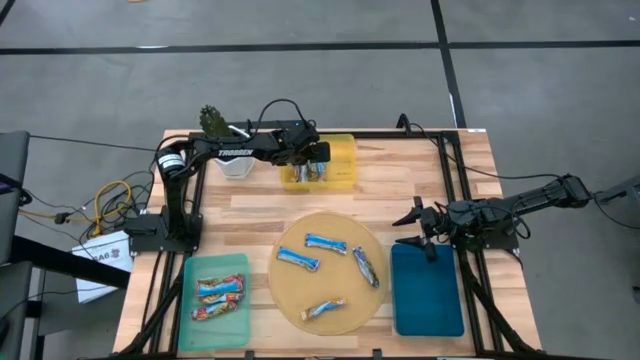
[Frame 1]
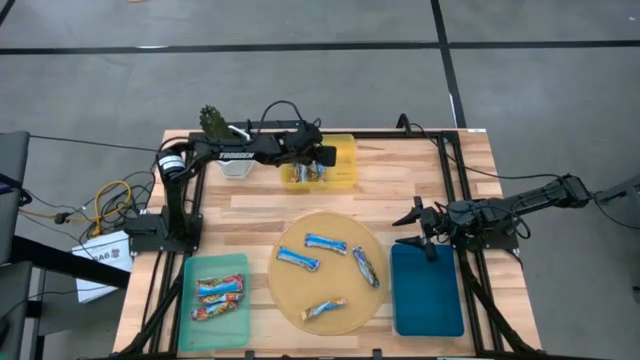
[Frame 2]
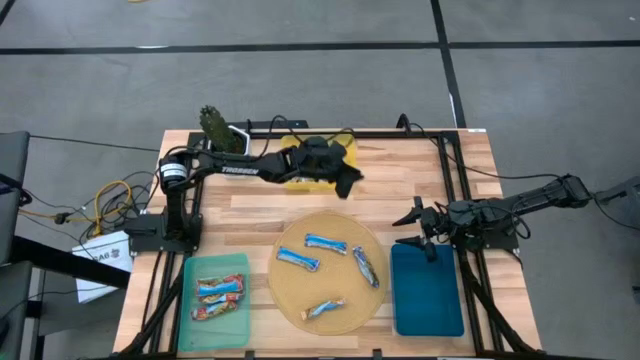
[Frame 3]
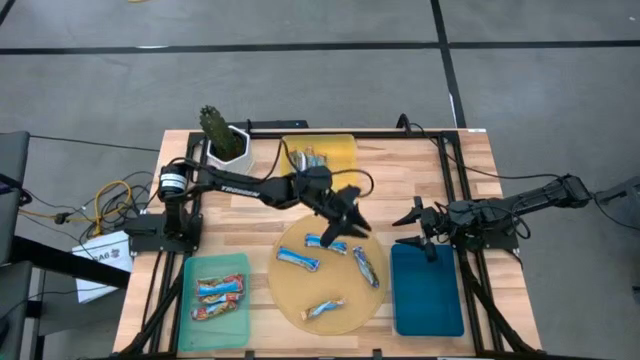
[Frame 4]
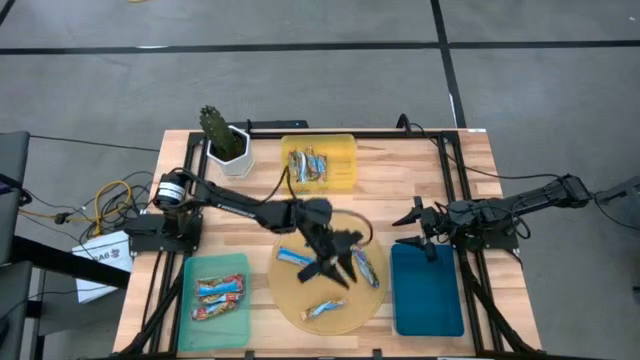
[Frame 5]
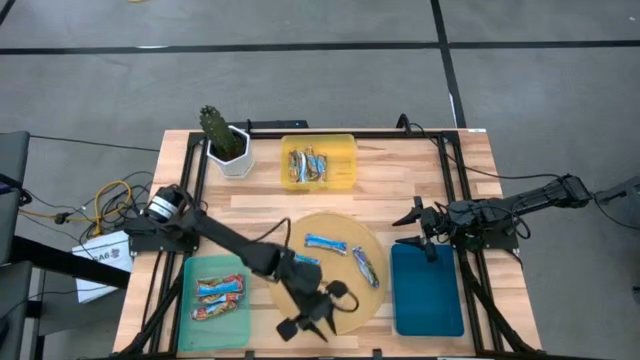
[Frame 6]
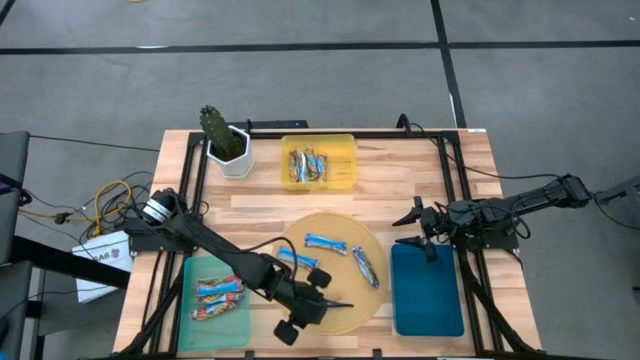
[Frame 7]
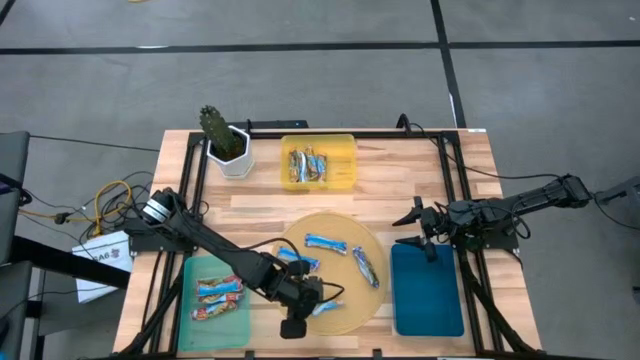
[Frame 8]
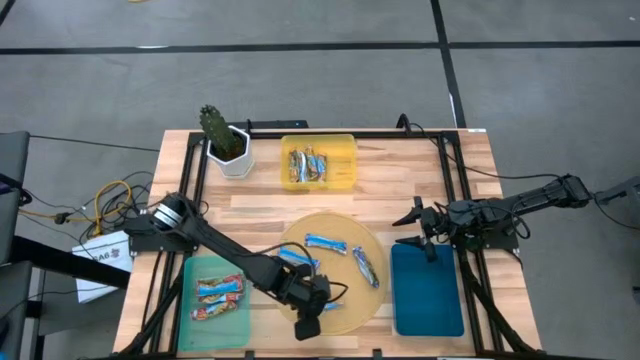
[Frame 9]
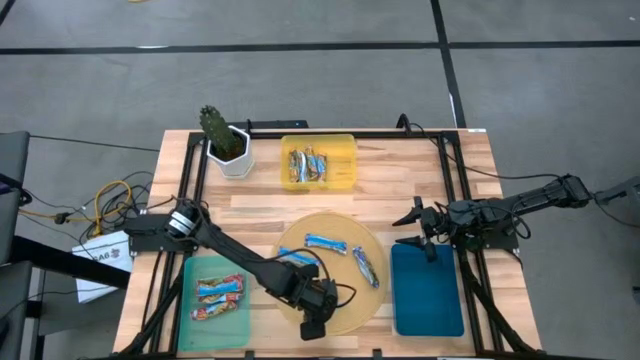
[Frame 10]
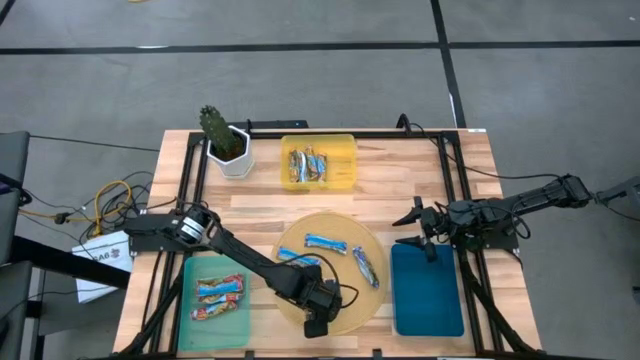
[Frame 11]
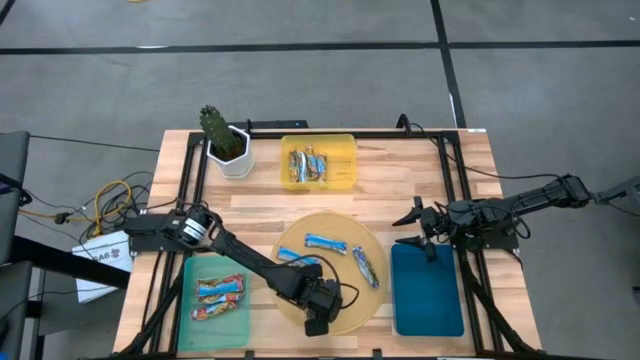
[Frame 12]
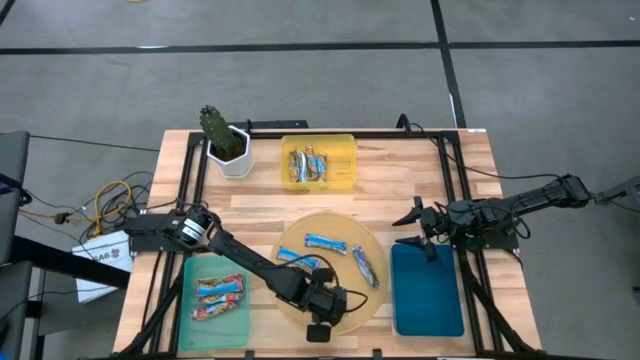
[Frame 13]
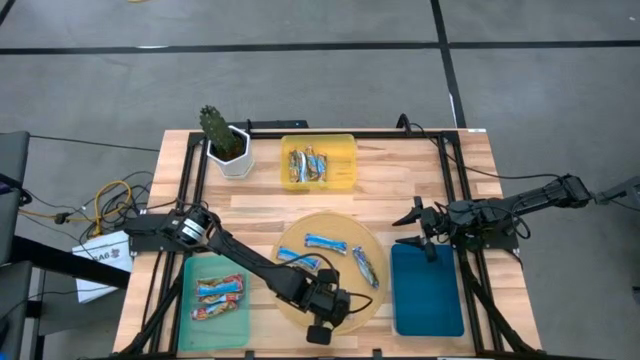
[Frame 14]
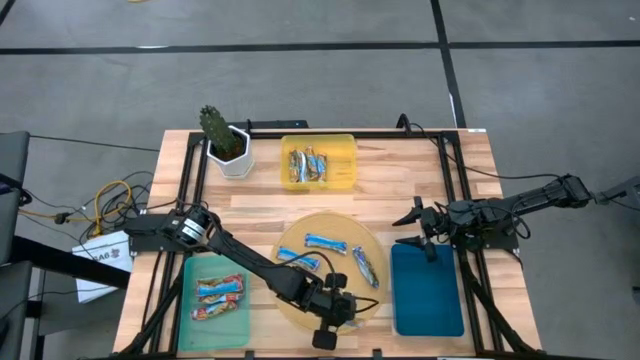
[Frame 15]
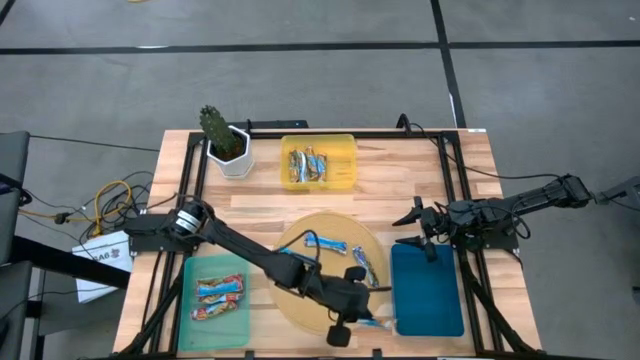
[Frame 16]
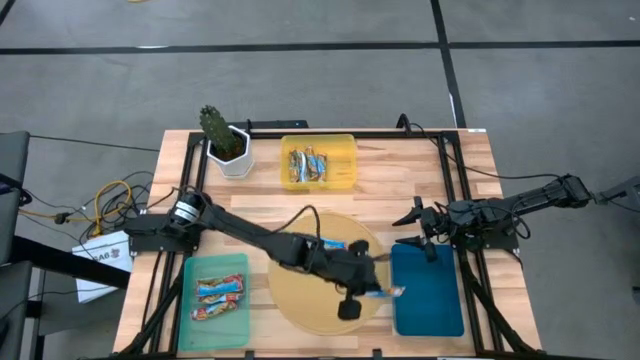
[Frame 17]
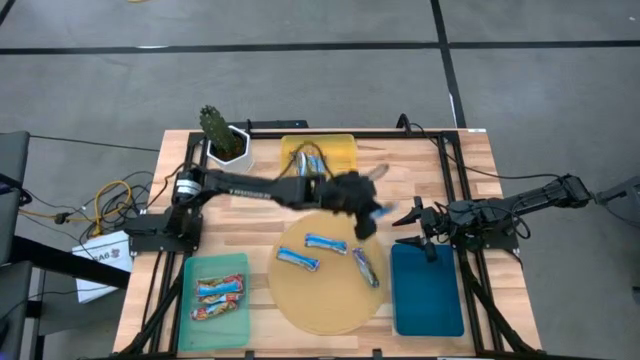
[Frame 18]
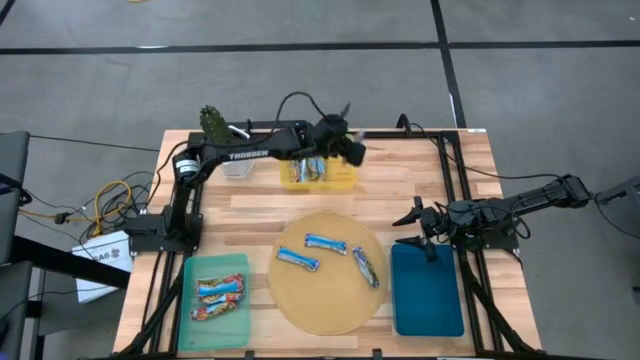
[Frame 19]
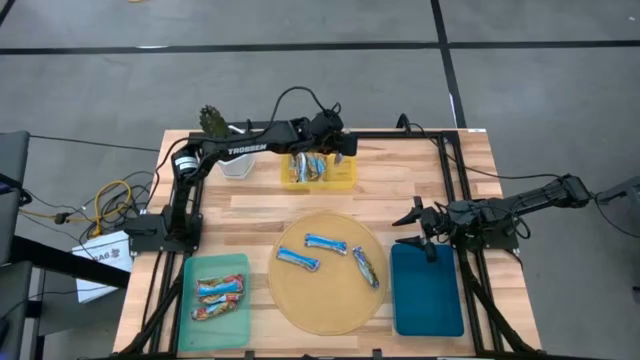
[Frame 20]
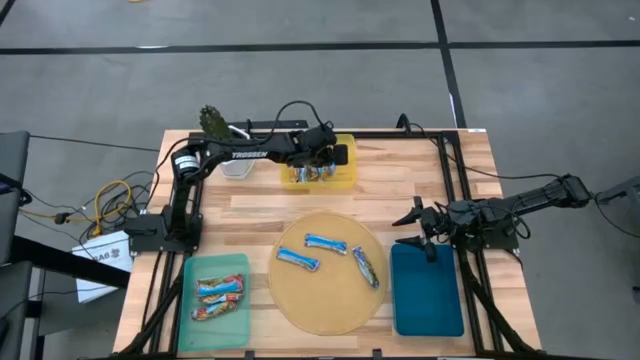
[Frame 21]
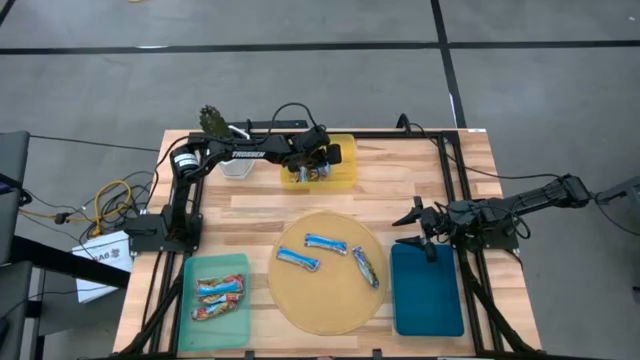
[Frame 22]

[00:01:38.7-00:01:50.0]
Task: Pick and place Granola Bars by type
Put the yellow granola bar into the yellow bin

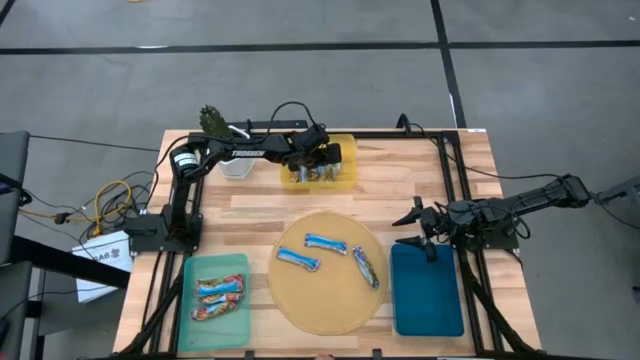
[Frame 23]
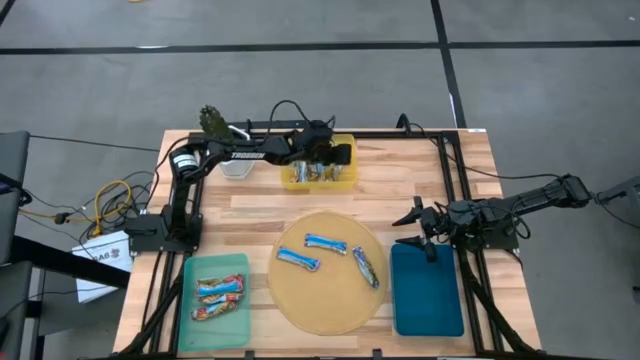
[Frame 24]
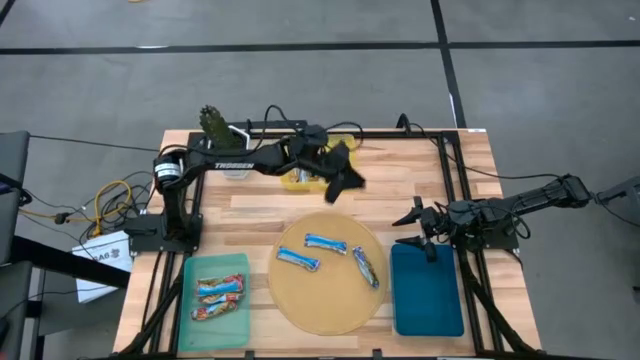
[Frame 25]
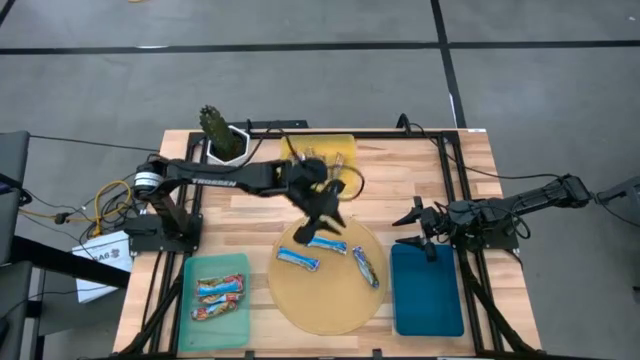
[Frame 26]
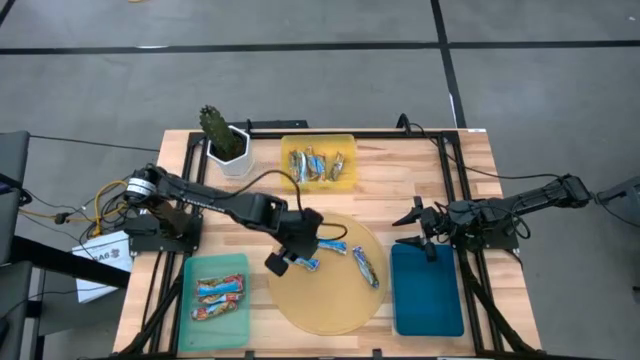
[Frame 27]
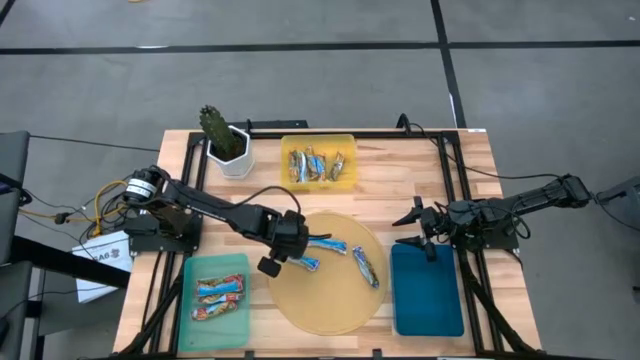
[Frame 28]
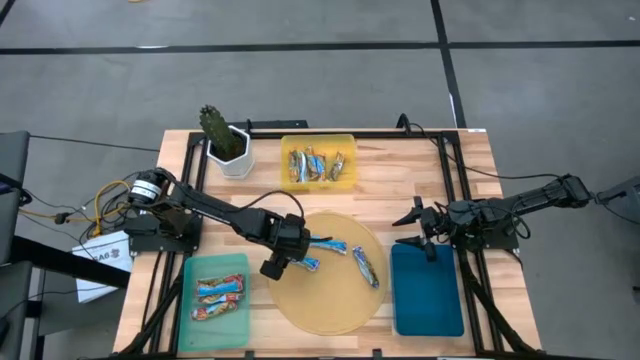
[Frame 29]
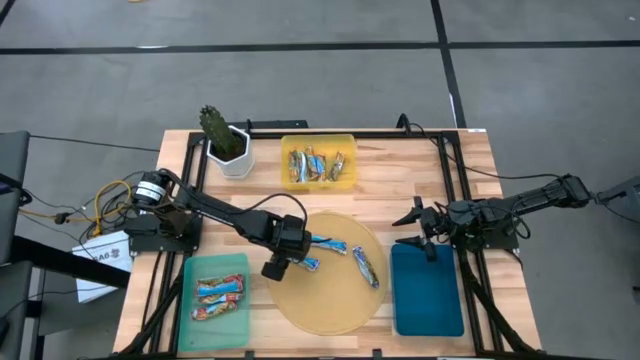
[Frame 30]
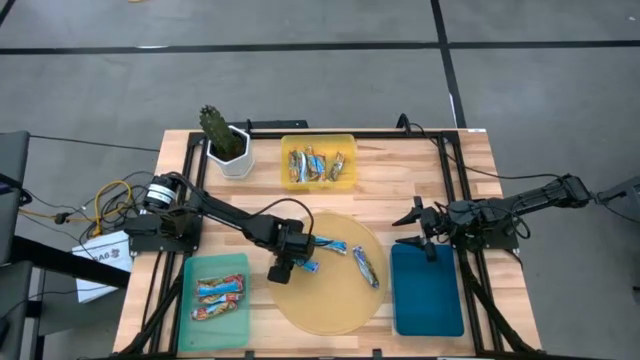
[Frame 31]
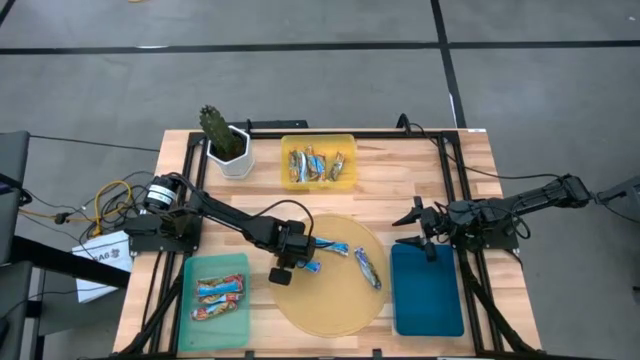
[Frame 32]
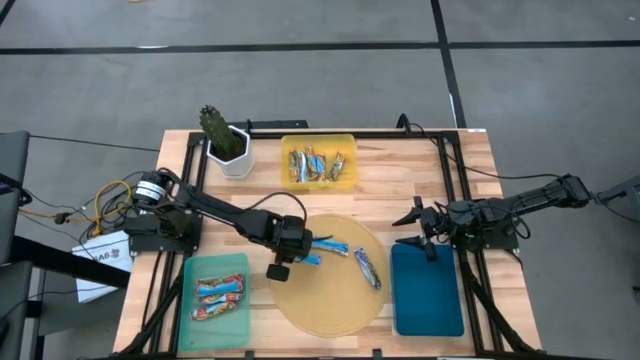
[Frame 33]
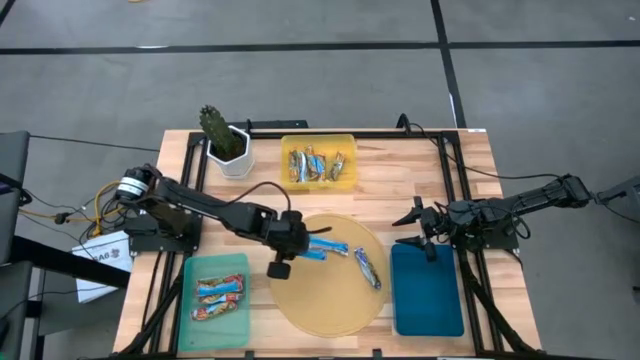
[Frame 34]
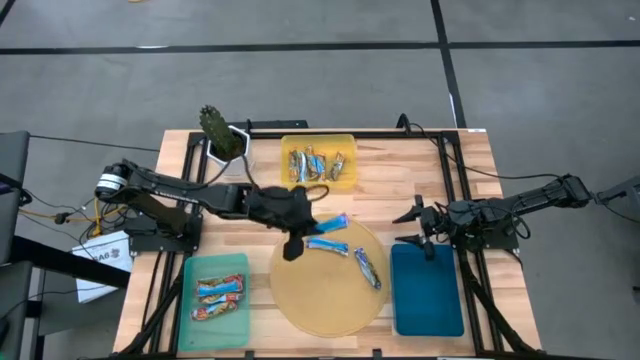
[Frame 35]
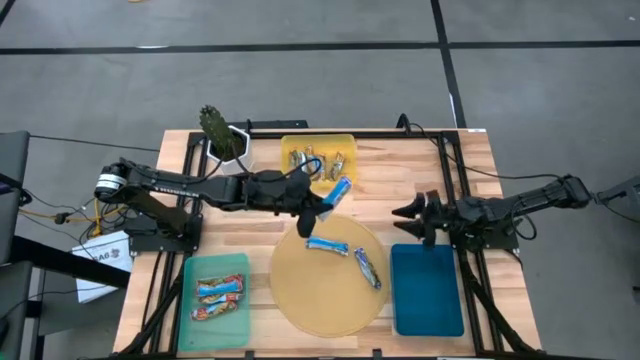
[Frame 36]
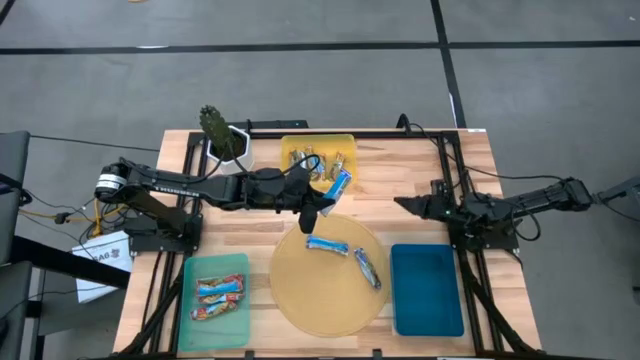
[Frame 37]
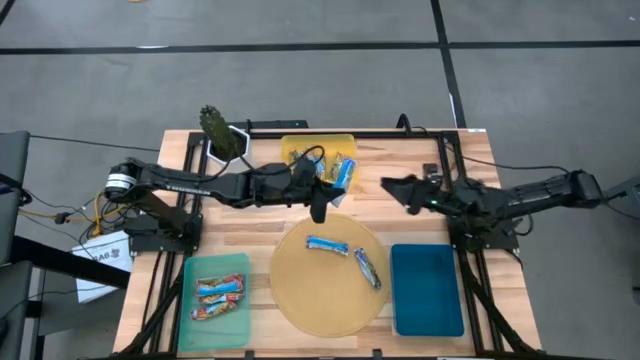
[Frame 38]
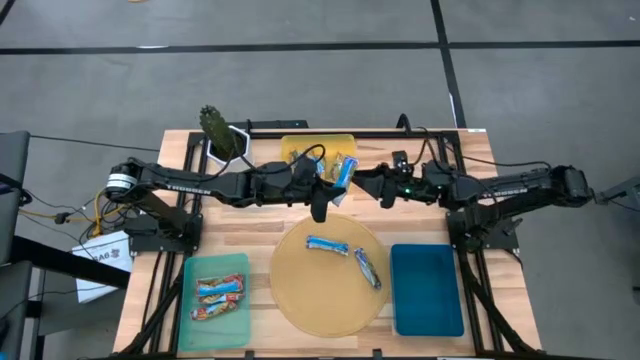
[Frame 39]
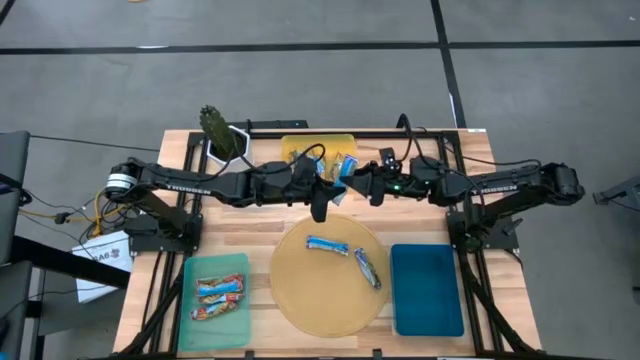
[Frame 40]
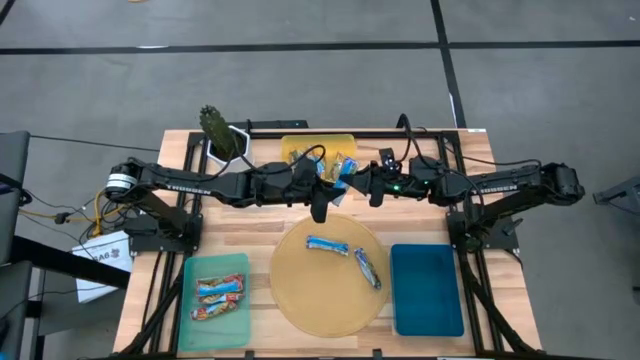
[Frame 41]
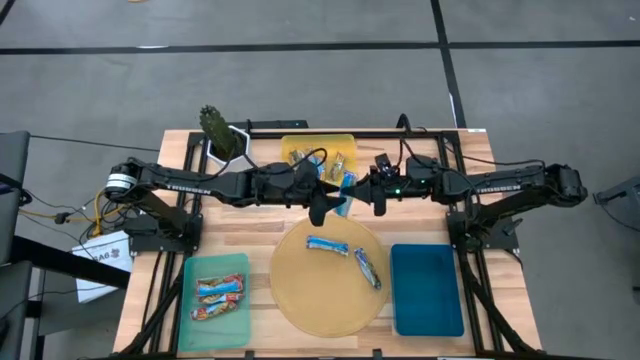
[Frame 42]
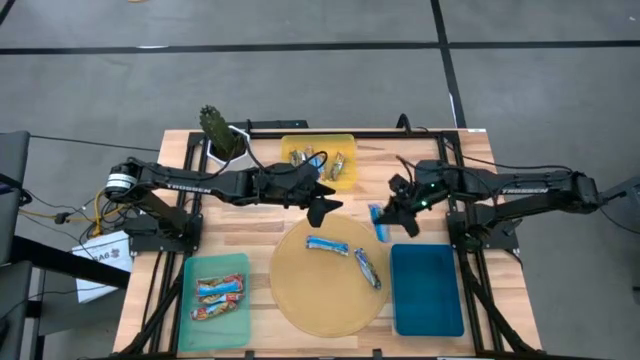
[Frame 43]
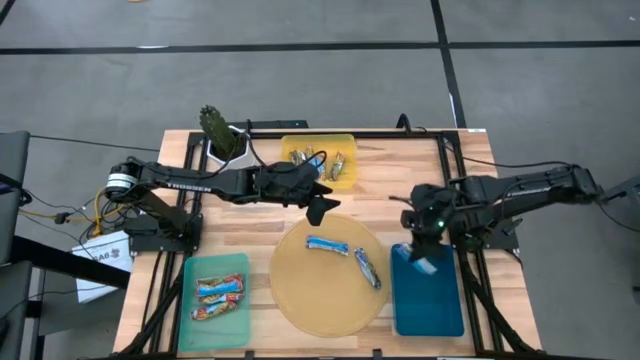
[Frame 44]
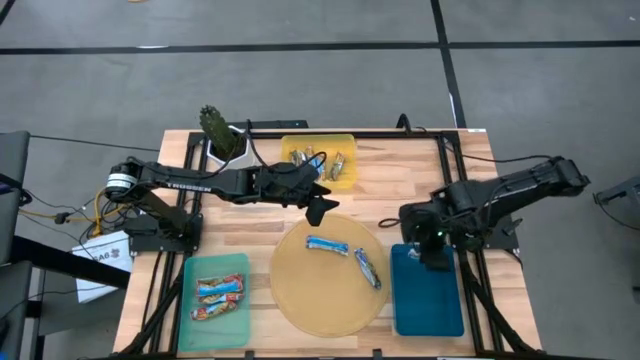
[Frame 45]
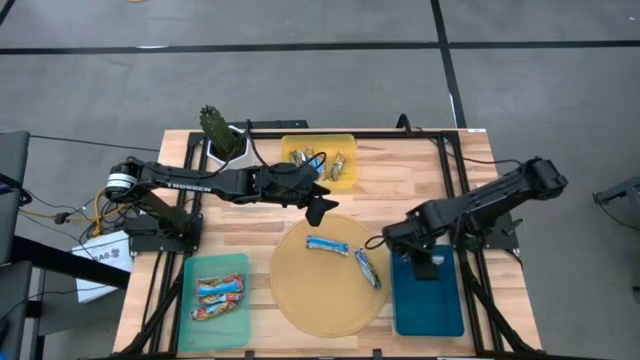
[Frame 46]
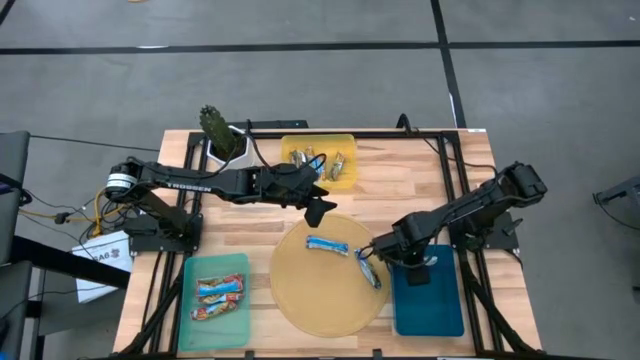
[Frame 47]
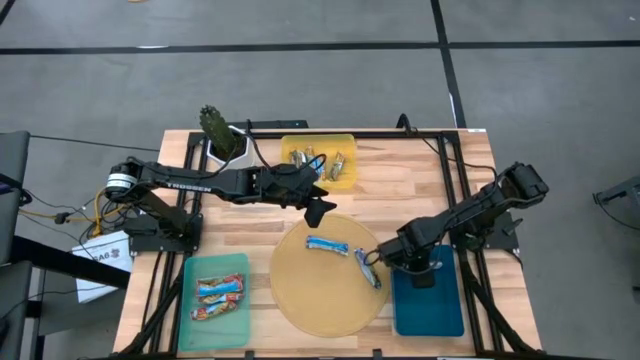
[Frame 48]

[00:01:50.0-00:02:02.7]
Put the blue granola bar into the dark blue bin
